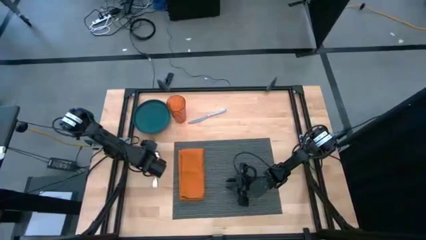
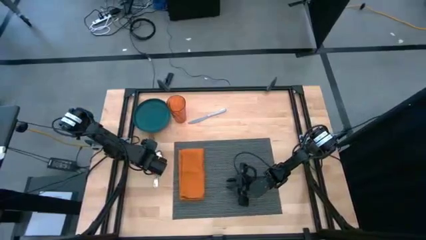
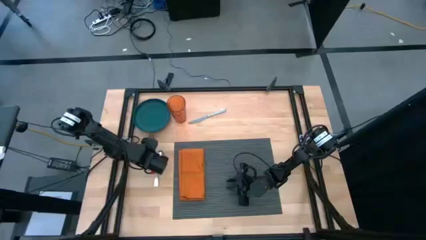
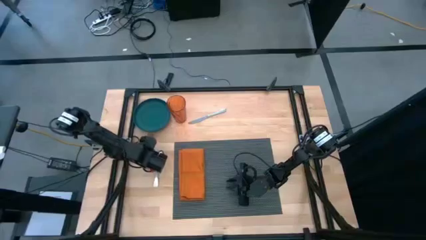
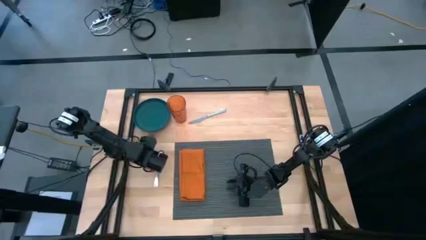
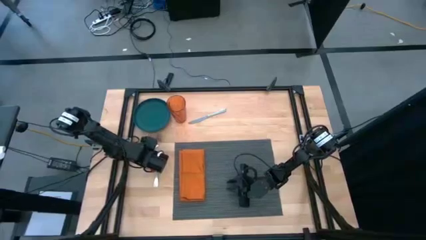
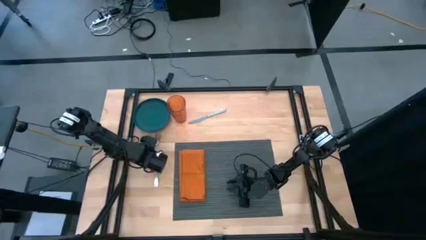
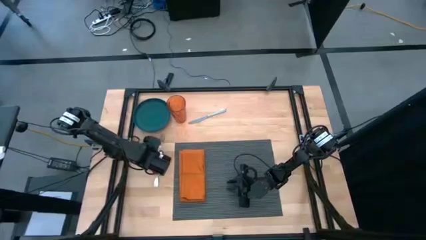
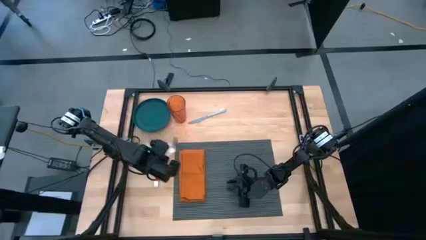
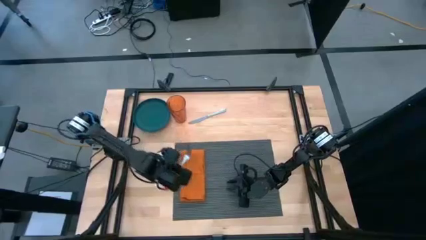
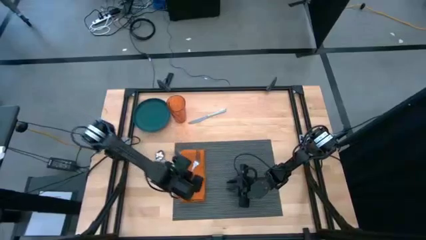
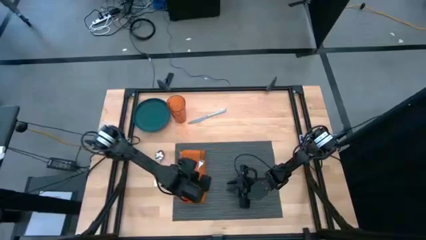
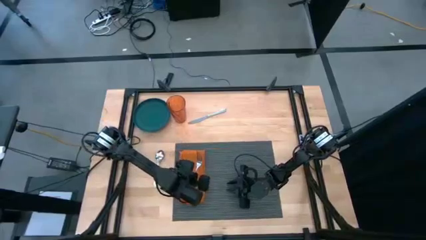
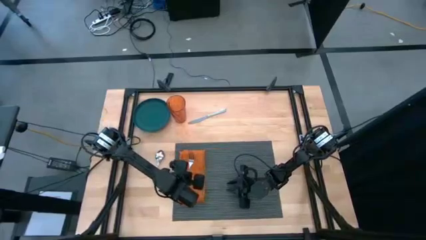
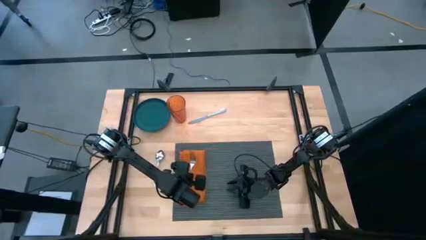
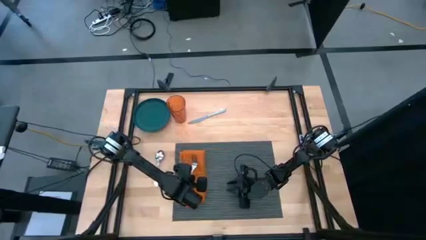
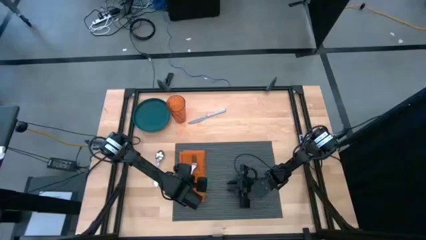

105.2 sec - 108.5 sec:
Task: Set table place
Put the silver fork on top of the orange table napkin

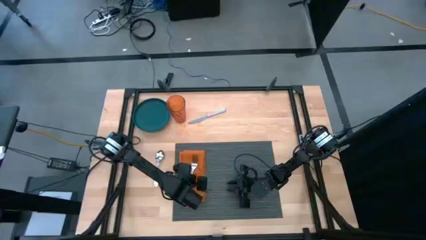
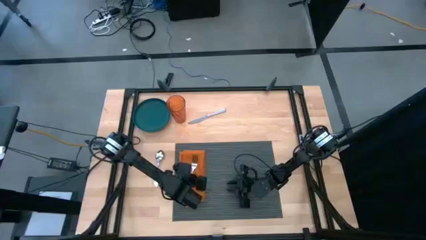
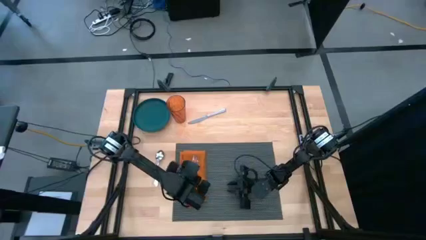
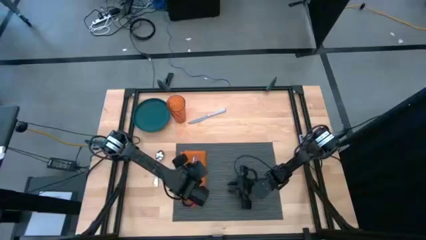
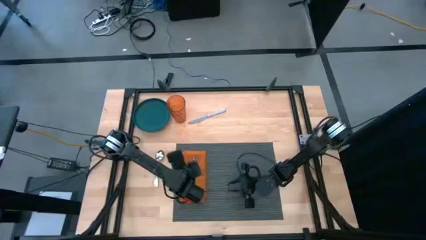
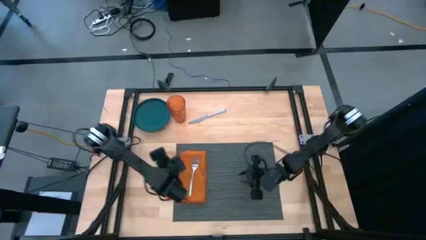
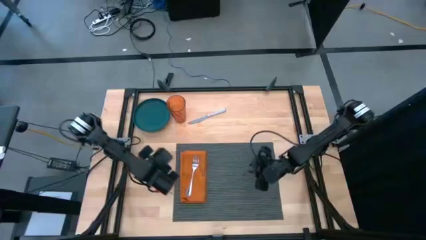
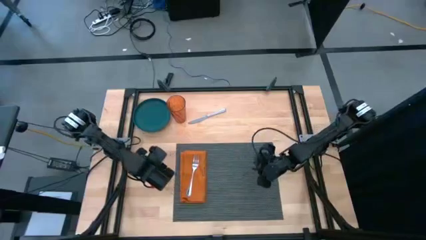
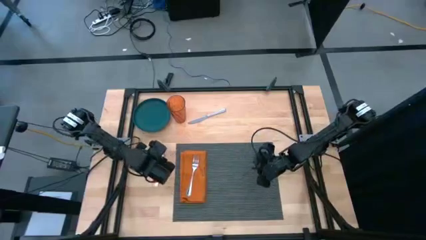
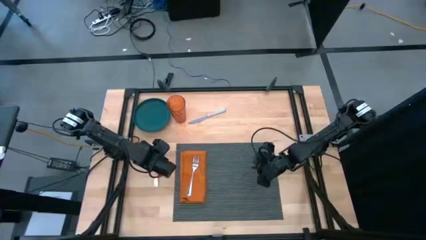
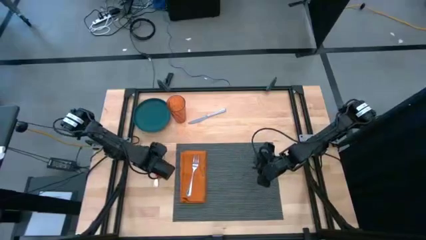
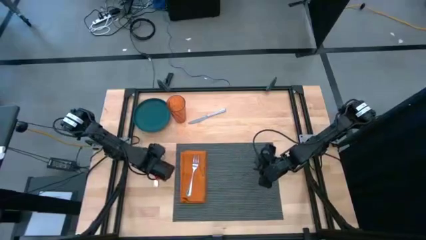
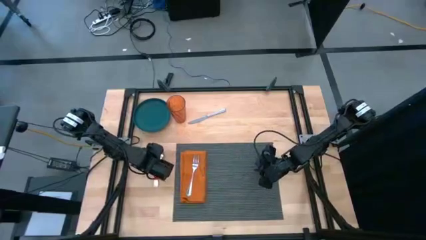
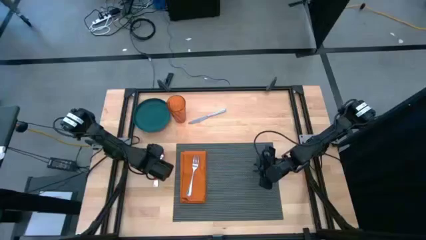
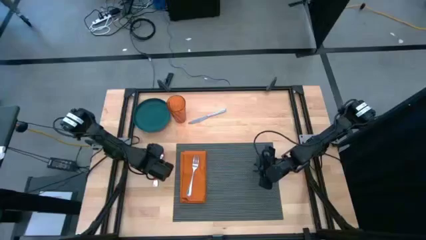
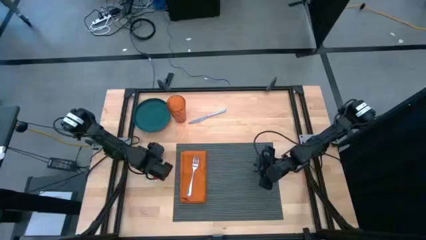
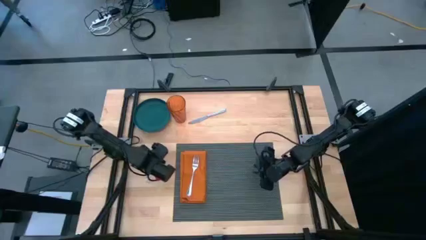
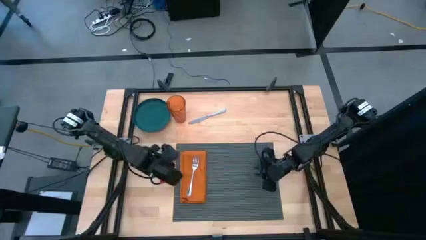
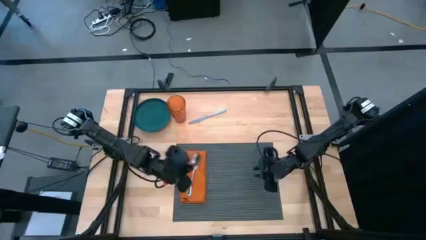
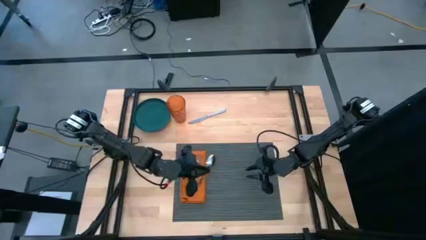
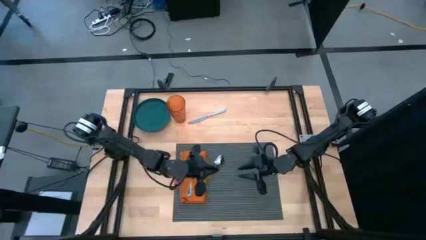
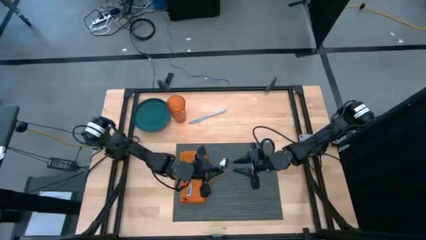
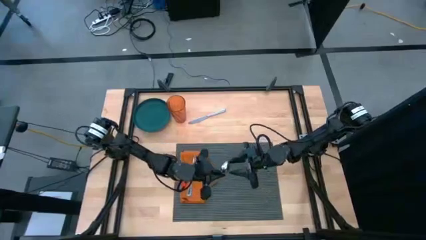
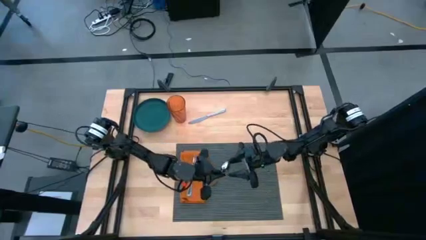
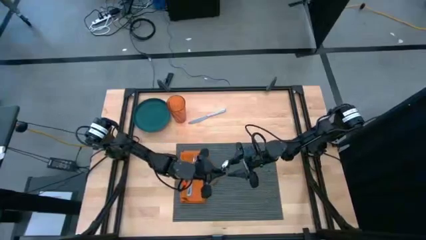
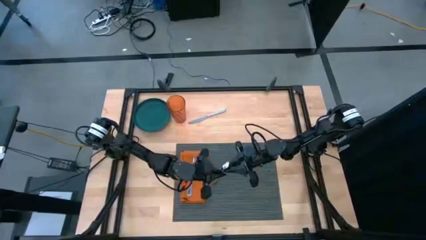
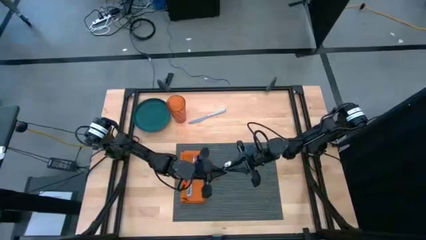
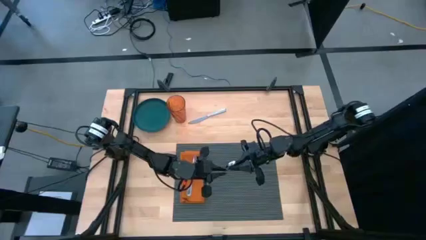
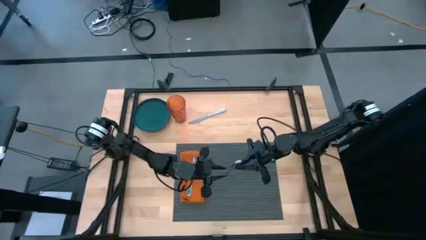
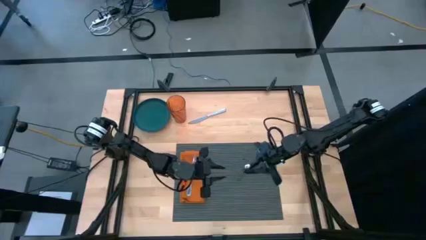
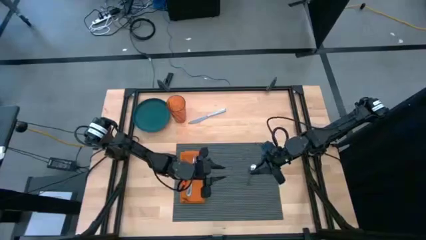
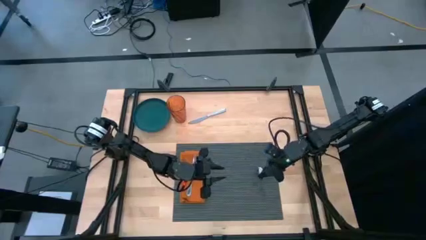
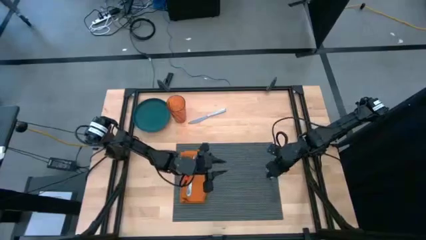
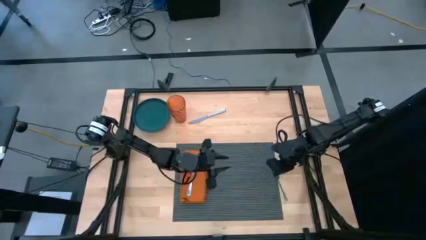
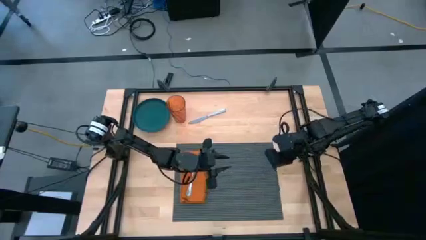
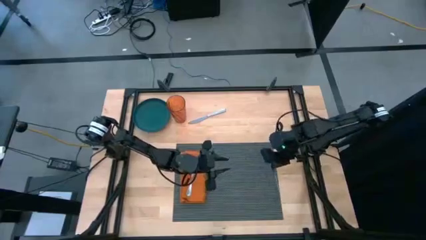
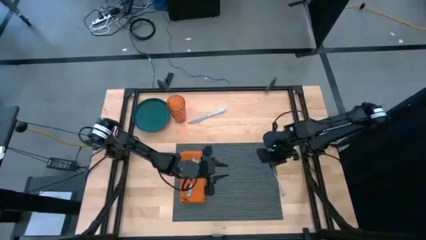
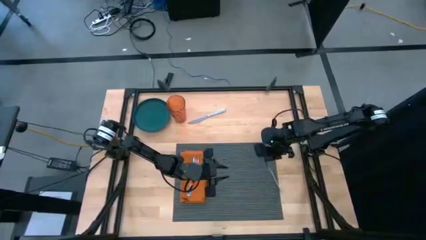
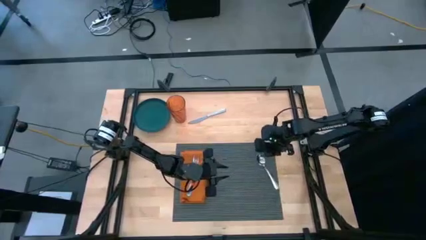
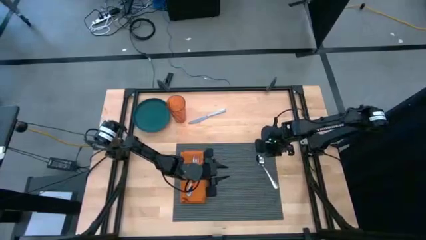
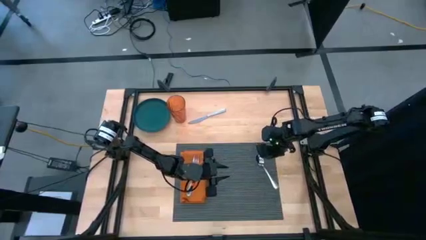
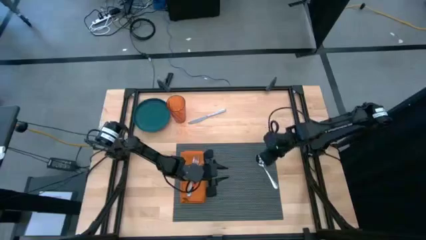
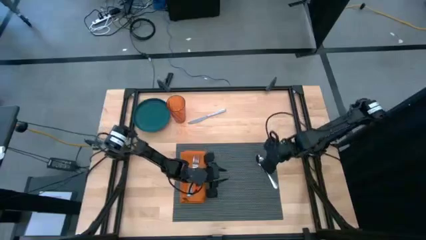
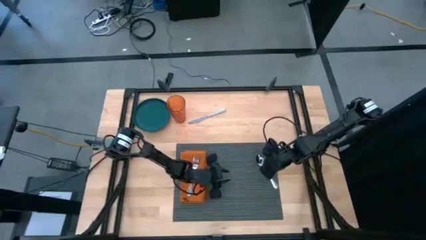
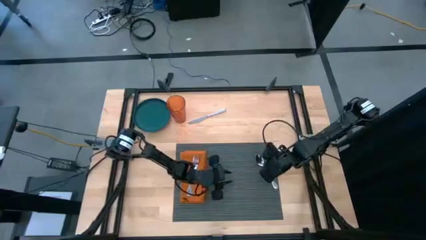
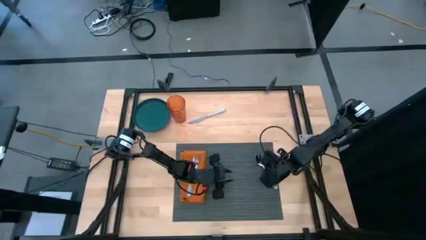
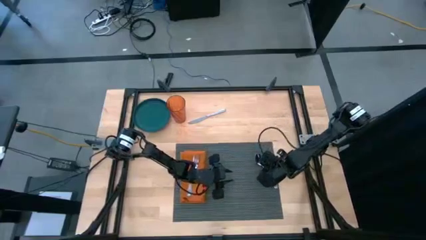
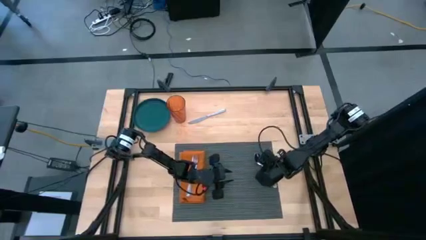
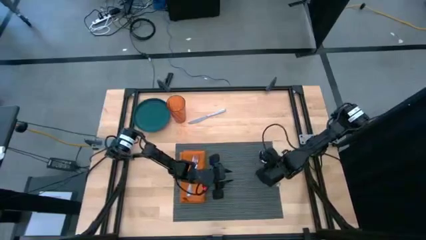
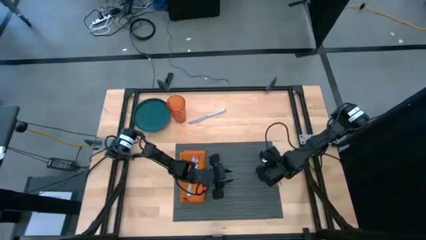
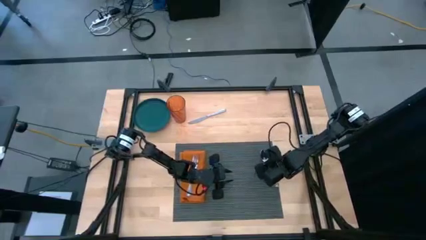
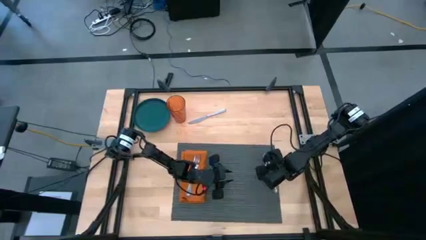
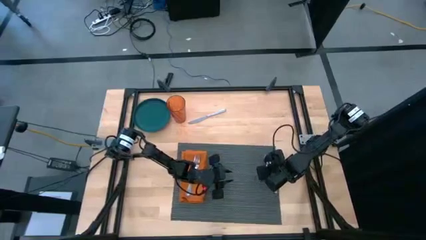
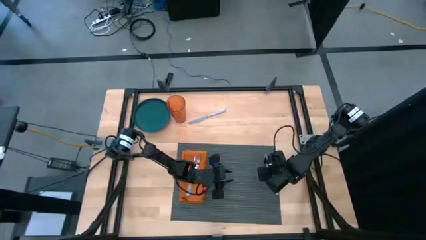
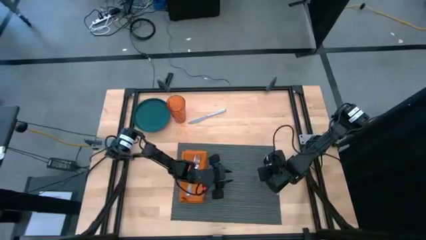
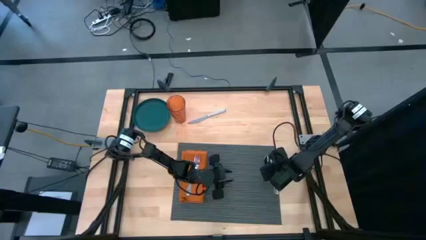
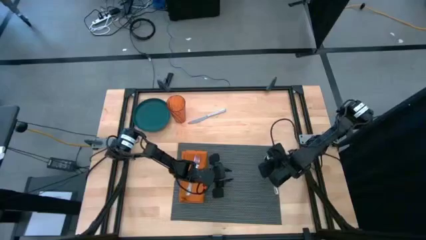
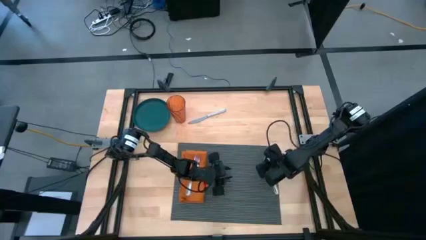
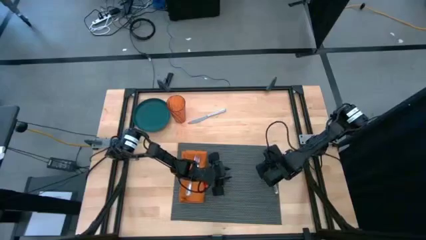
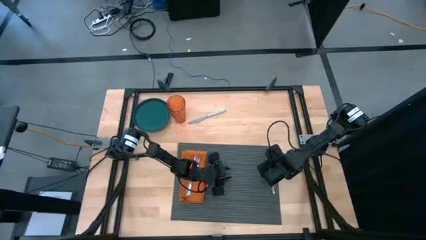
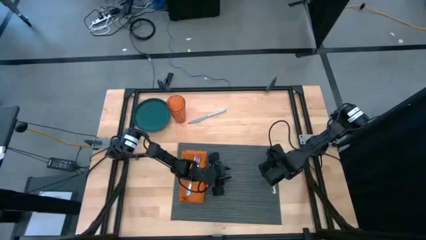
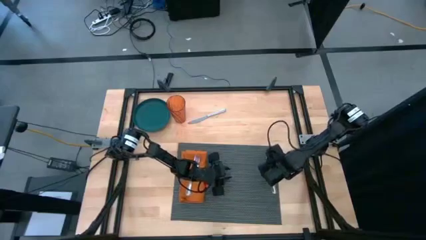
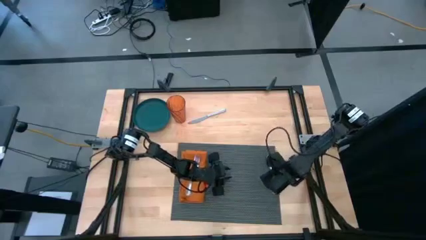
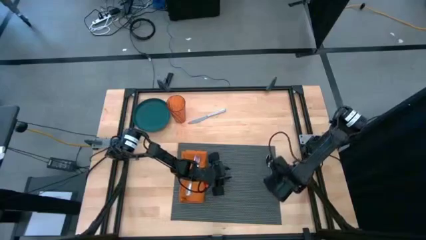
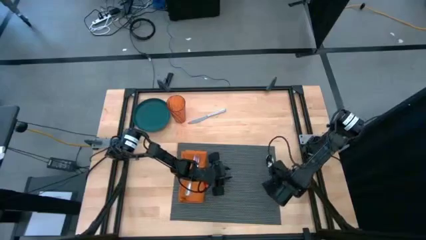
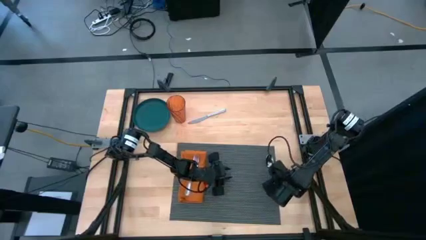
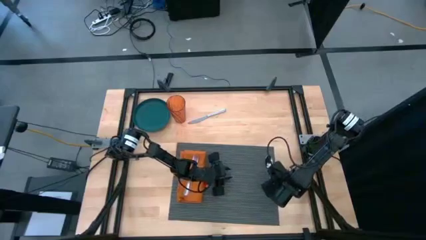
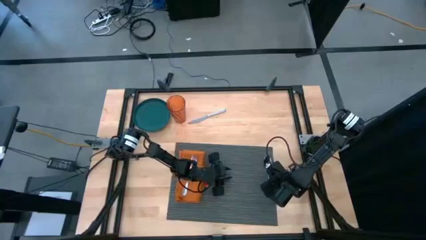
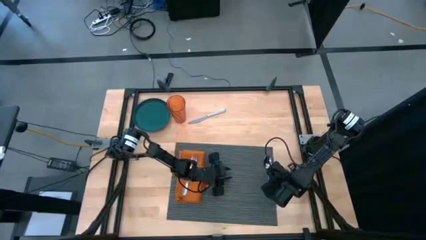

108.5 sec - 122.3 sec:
Put the silver spoon to the middle right of the black placemat
